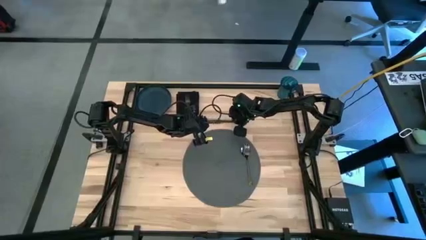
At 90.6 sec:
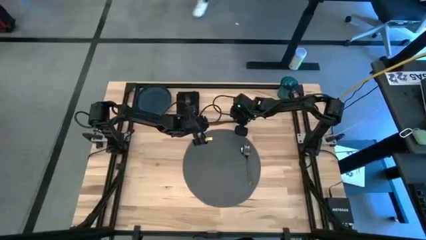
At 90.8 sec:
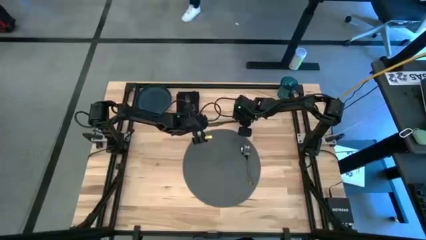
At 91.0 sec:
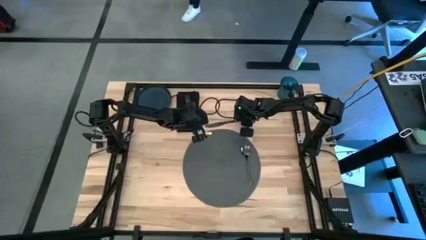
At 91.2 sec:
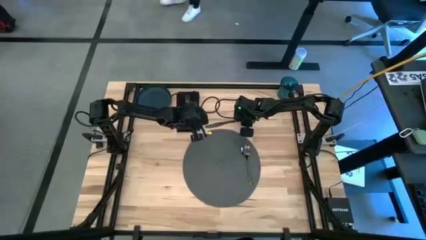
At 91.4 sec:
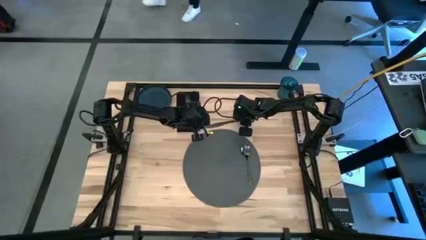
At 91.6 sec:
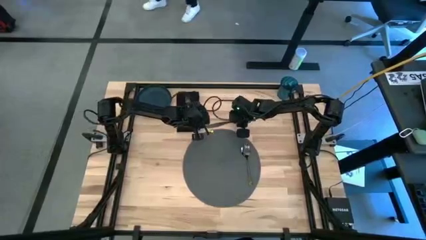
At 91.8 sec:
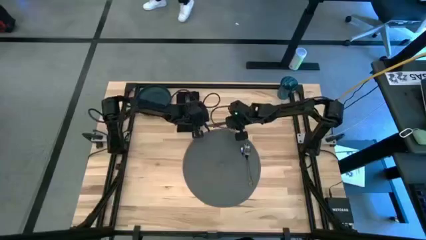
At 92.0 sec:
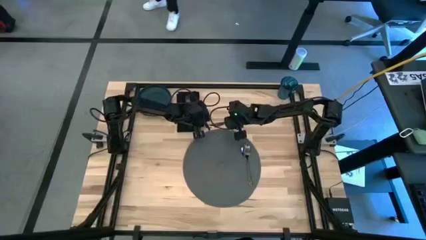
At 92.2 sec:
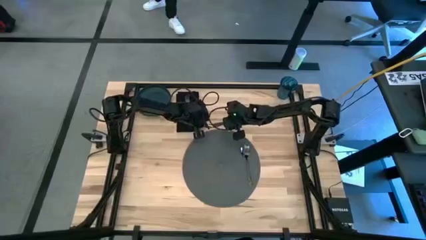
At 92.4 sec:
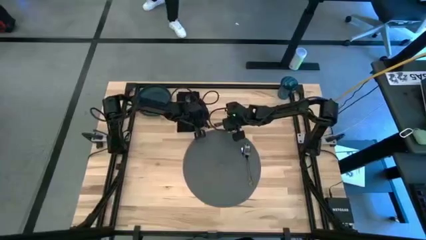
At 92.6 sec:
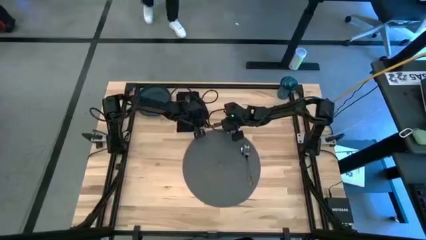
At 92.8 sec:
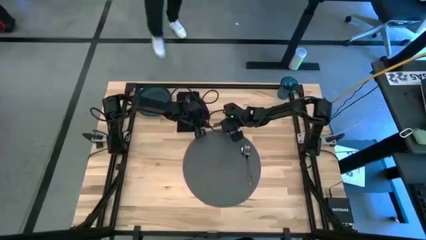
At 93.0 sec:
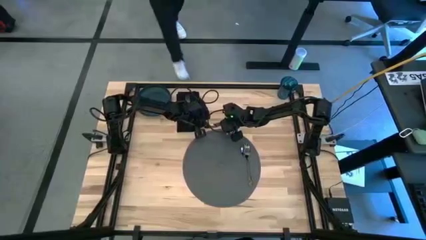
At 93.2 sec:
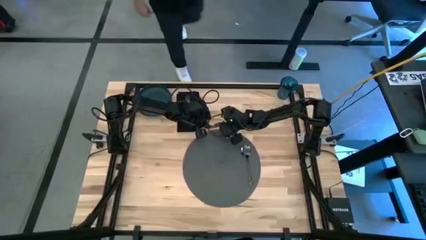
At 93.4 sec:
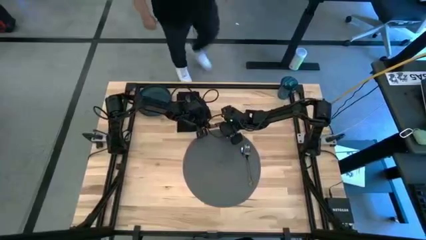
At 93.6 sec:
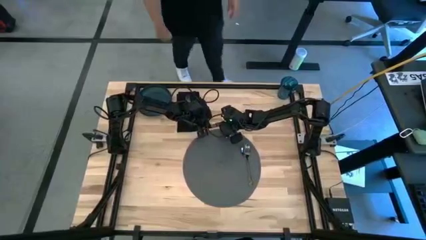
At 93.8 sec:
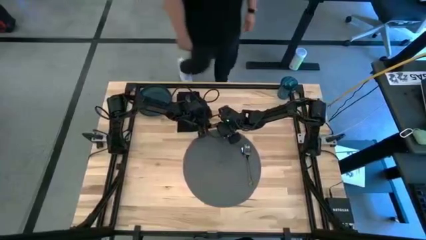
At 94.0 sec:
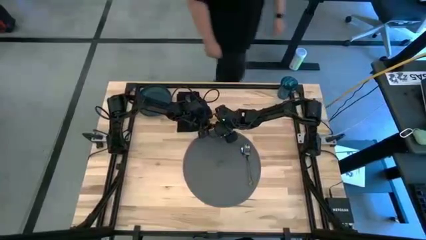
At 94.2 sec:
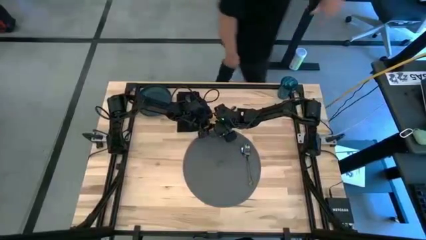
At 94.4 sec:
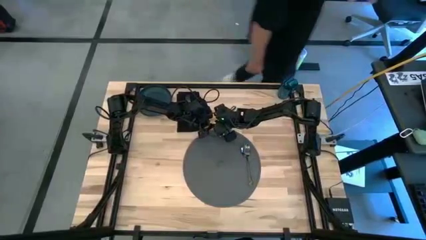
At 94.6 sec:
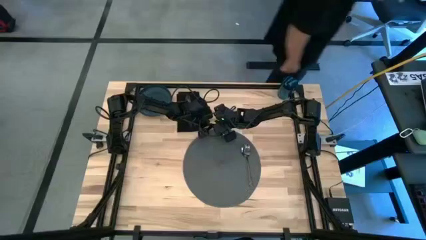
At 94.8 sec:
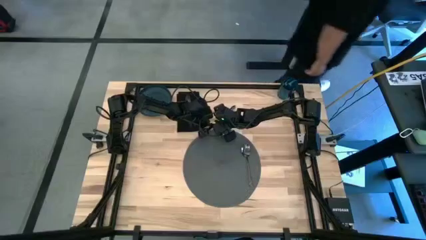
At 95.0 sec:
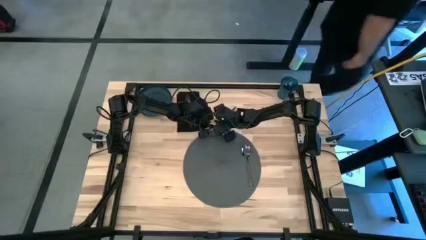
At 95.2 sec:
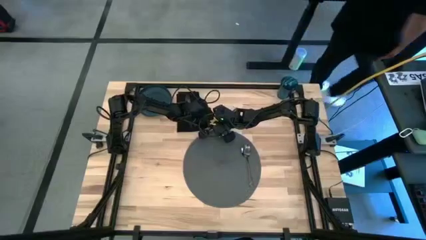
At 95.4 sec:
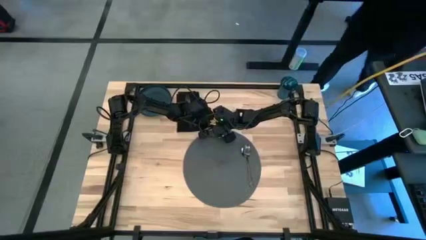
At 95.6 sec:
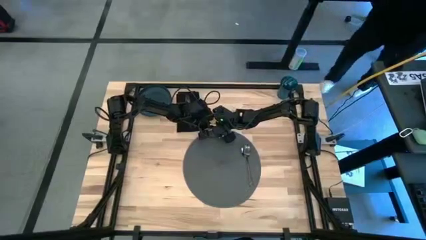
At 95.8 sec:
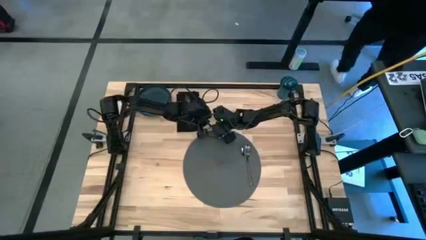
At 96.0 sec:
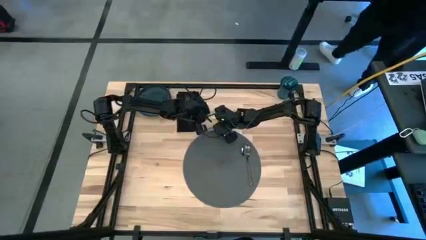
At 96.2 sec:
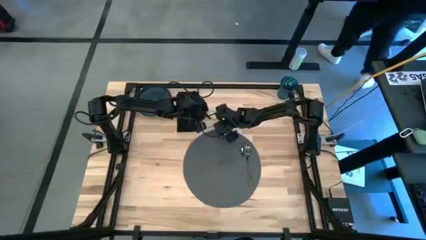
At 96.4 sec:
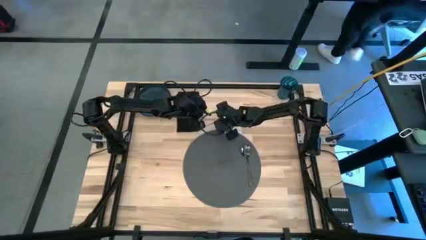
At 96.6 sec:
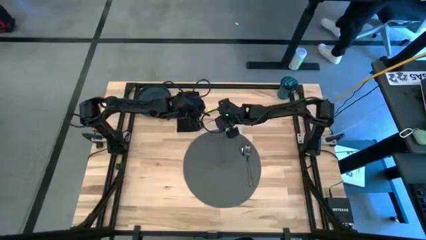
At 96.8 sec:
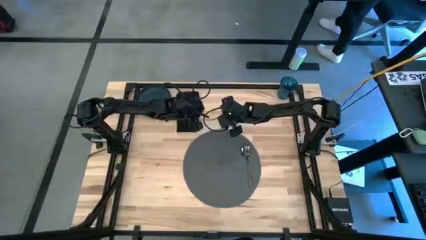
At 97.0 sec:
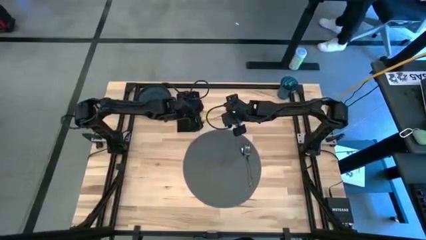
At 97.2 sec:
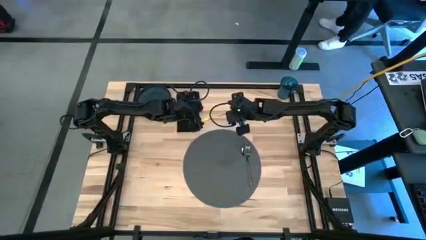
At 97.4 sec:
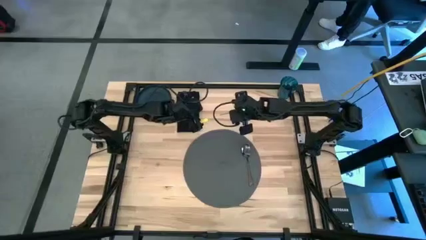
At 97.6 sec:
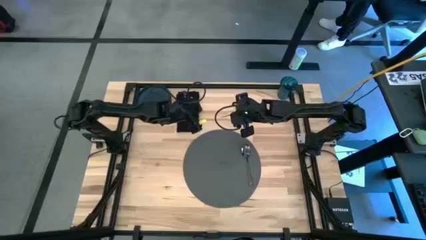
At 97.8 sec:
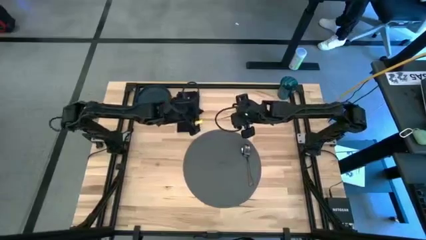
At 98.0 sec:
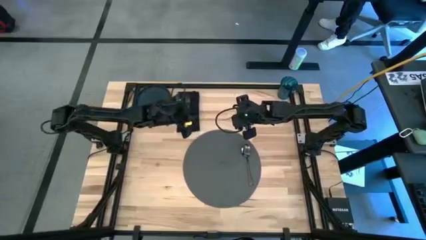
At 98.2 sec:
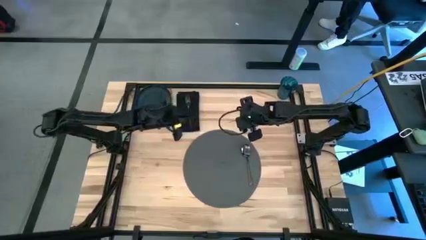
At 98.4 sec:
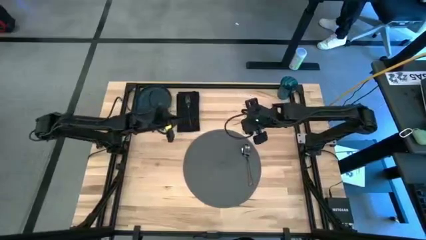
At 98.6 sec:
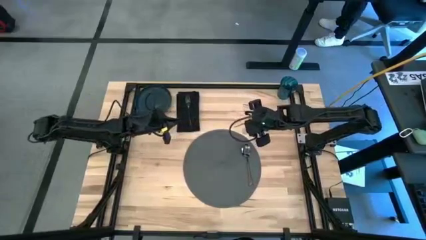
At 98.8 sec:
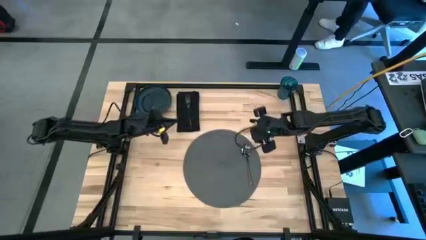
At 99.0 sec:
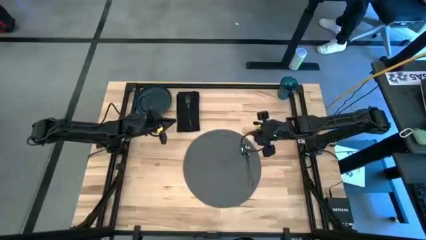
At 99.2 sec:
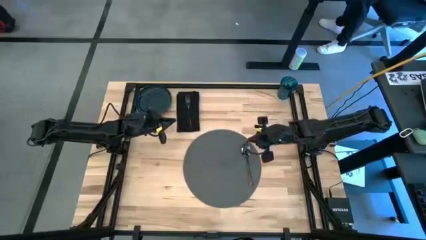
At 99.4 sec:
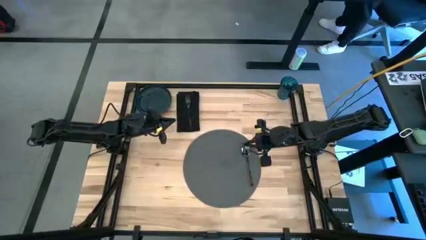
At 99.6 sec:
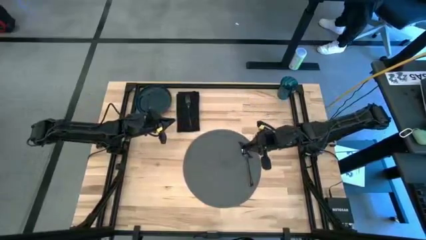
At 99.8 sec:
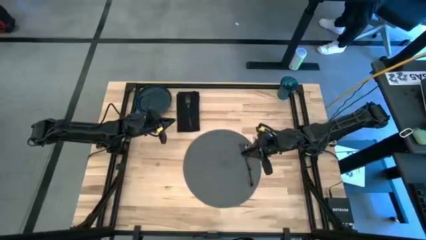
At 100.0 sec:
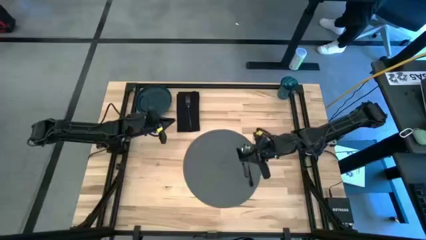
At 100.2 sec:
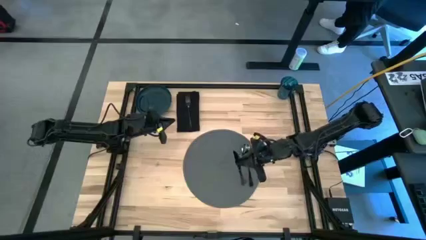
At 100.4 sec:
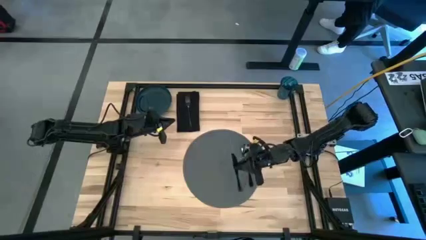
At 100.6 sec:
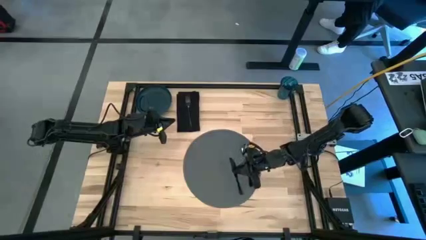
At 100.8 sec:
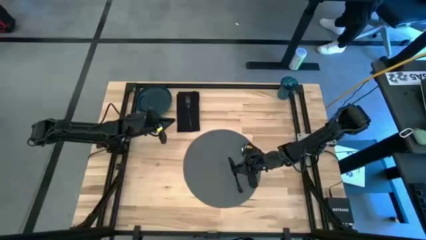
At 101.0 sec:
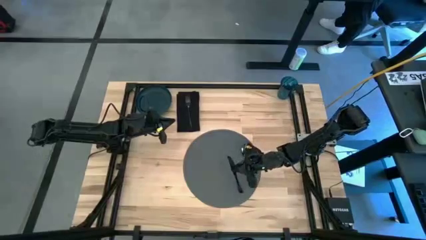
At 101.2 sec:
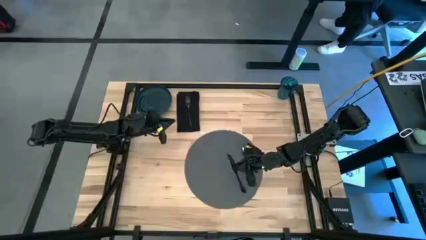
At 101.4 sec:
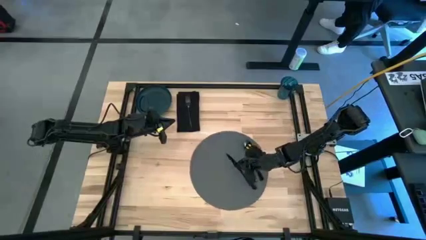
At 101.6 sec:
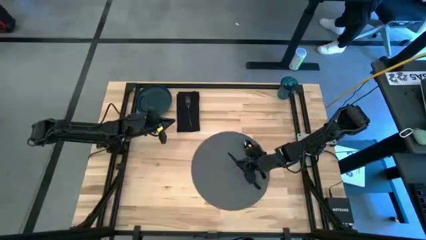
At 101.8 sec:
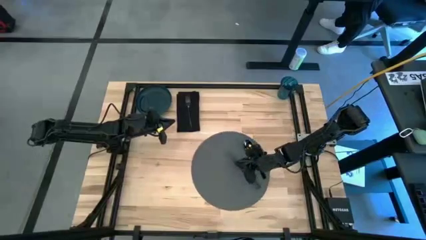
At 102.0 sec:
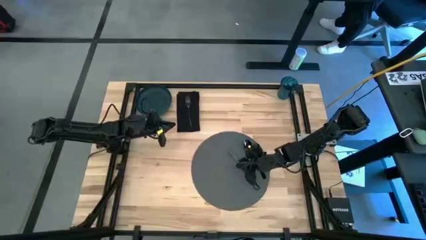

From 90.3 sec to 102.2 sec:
Task: Set table place
Put the black table knife on the gray tablemat to the left of the black spoon

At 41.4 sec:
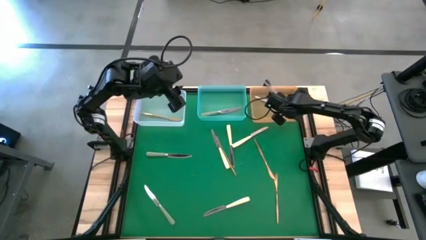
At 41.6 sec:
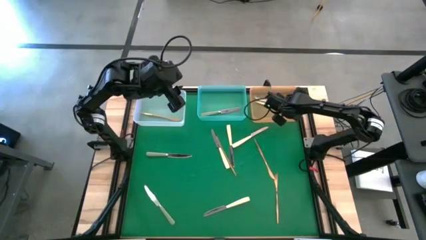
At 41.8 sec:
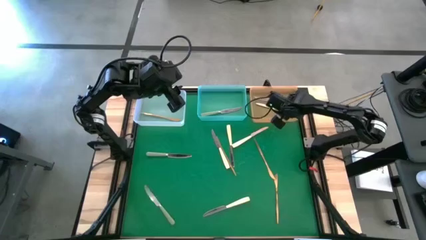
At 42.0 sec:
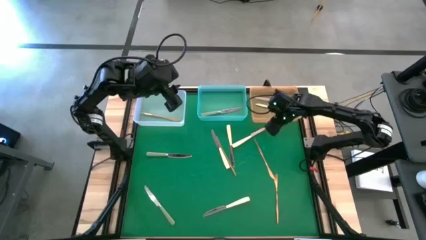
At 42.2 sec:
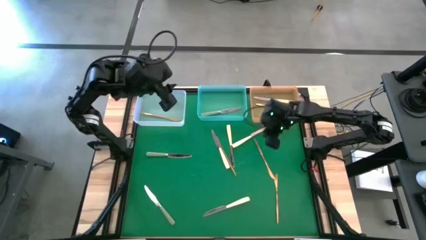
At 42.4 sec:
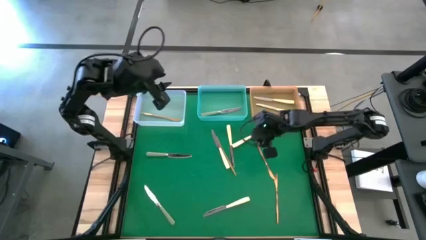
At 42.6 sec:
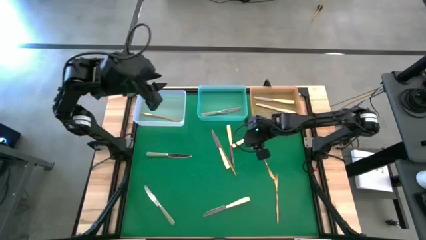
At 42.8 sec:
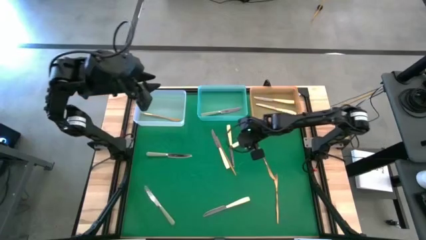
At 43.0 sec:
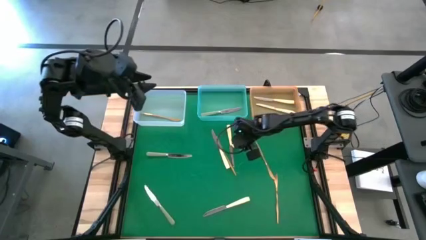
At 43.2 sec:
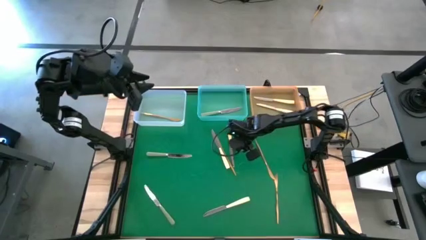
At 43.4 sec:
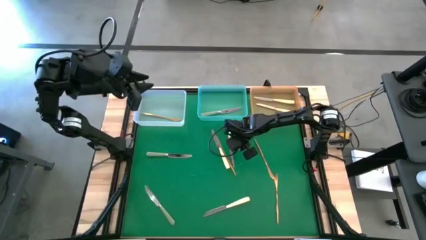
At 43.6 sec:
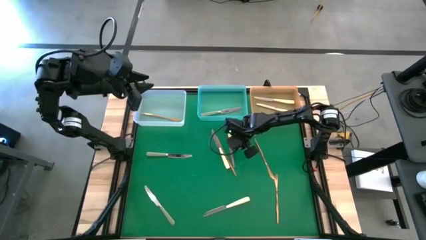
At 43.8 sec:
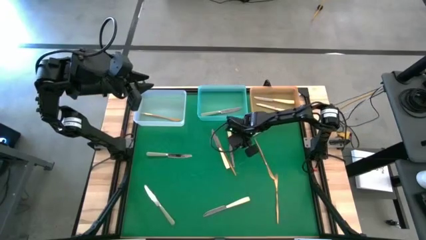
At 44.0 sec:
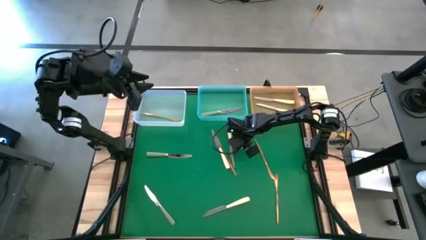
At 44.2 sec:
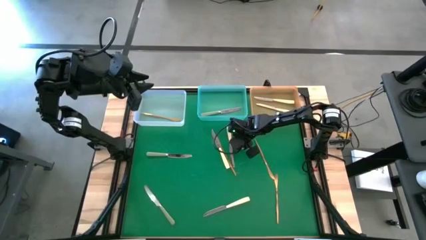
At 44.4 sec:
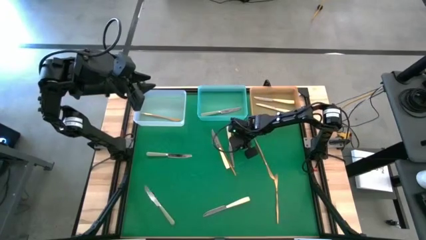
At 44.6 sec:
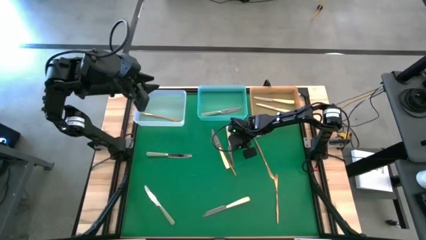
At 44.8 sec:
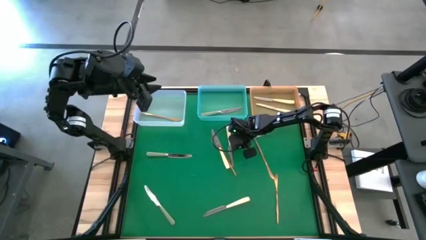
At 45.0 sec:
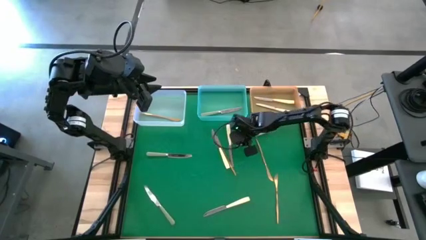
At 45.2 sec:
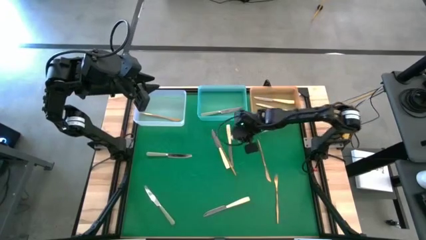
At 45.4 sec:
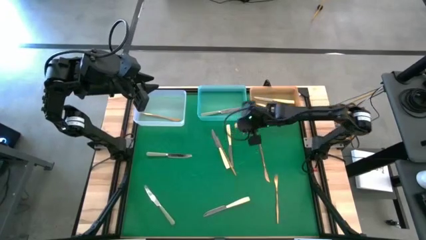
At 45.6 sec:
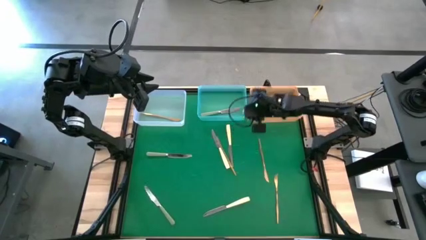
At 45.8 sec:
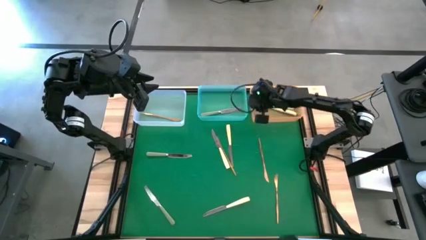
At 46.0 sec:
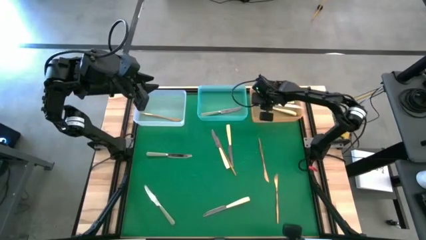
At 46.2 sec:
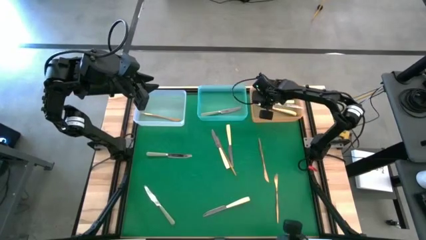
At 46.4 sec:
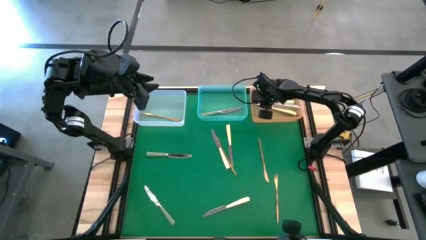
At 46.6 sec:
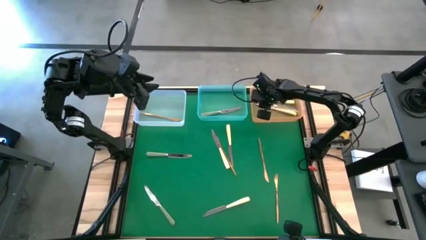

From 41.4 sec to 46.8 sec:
Task: Sort silverware by color (type)
Put the yellow table knife into the white bin
